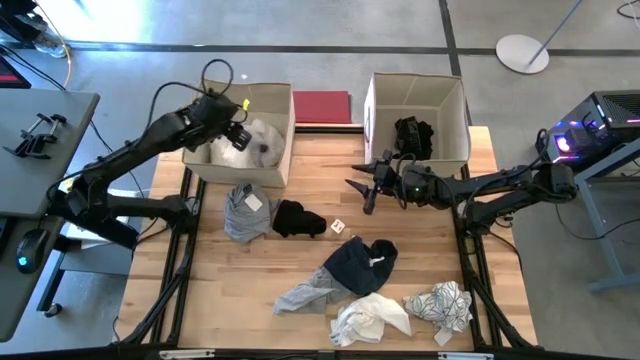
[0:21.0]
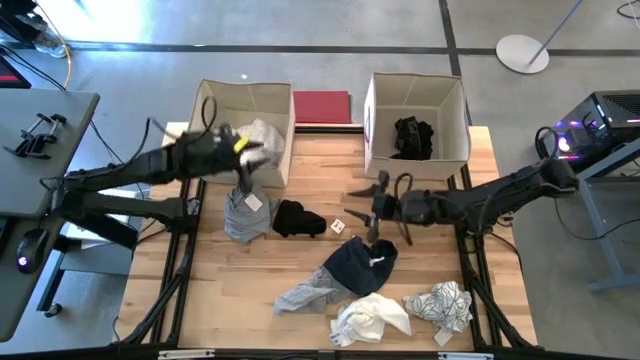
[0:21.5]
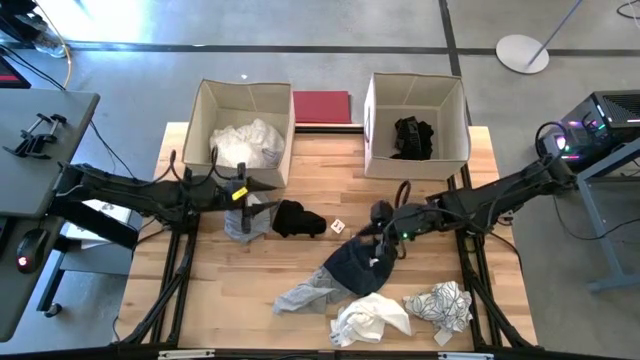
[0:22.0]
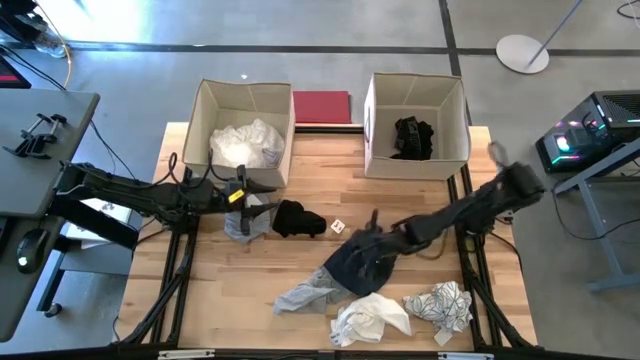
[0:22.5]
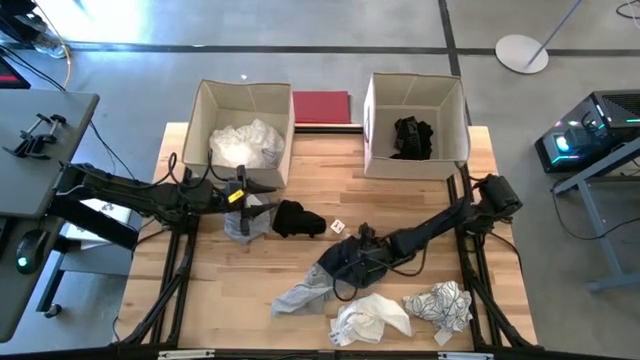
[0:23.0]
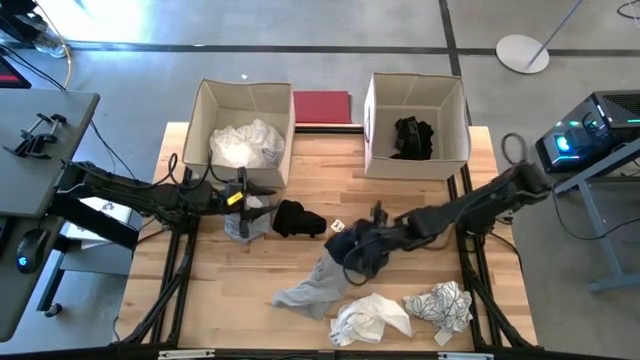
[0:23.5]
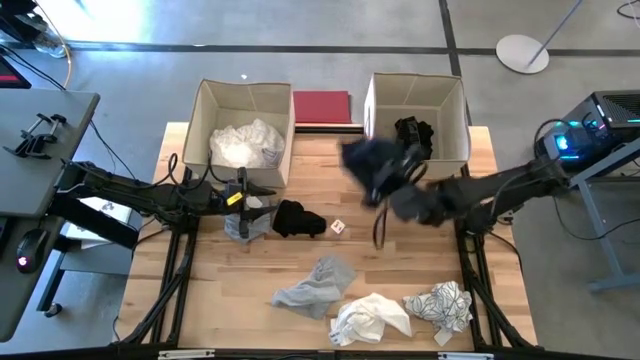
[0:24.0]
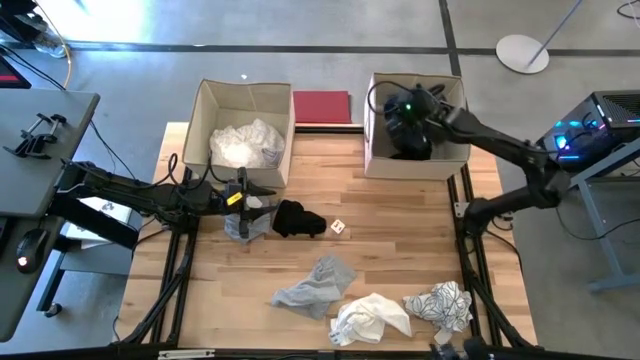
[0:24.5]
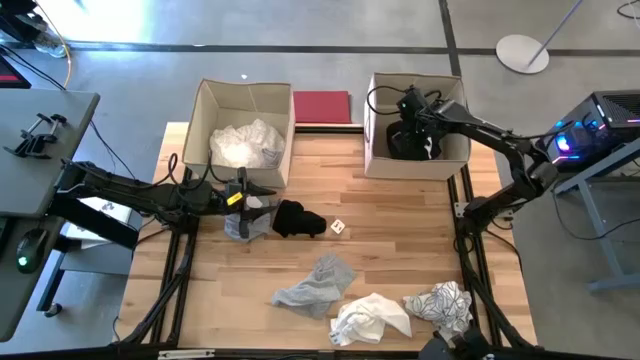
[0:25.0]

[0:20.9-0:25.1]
Put the black shorts into the right laundry organizer

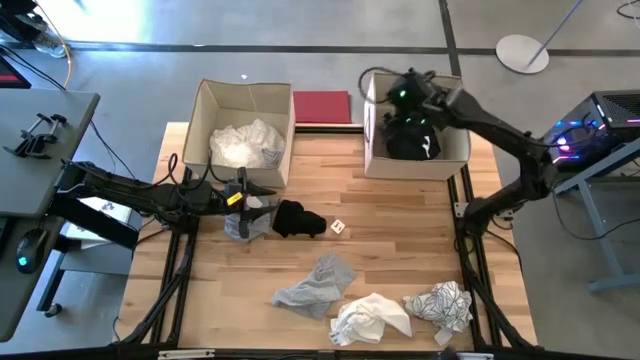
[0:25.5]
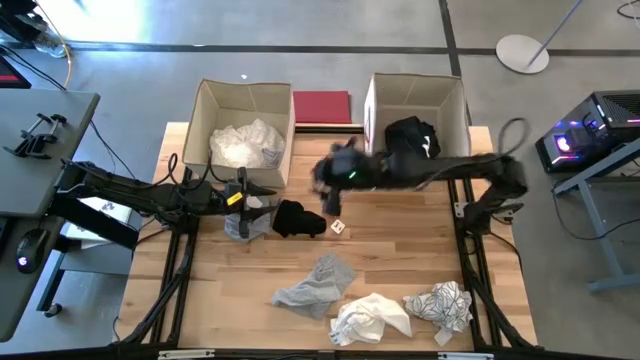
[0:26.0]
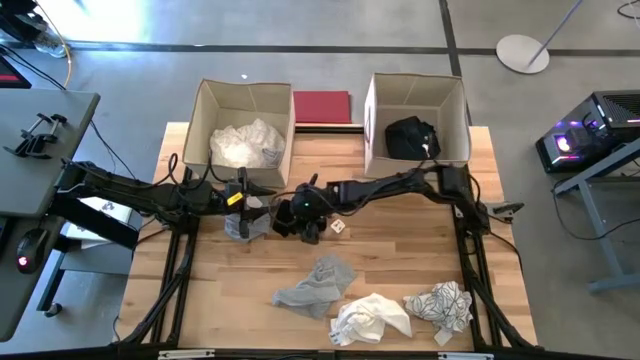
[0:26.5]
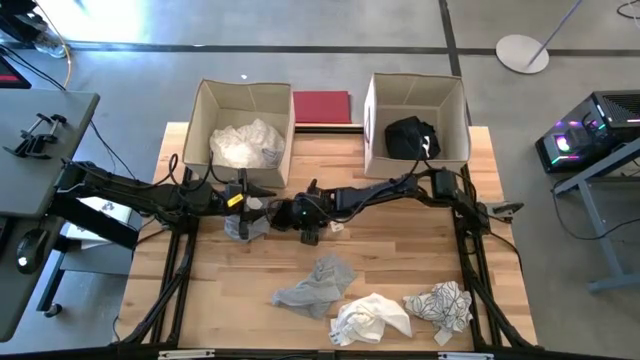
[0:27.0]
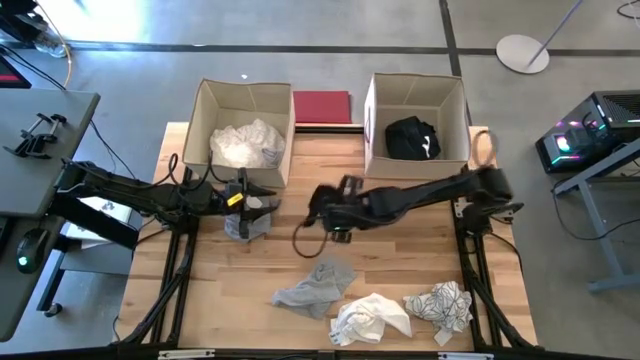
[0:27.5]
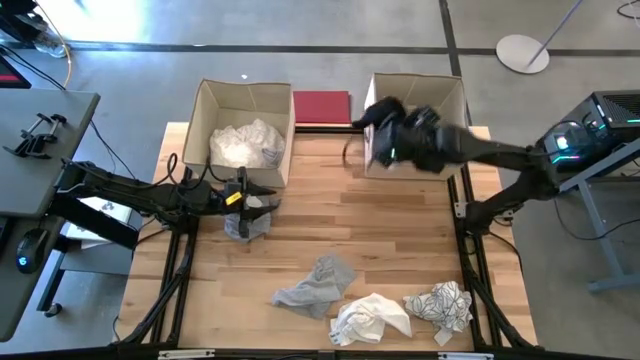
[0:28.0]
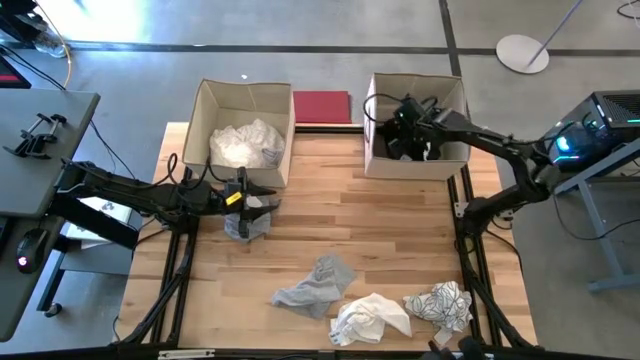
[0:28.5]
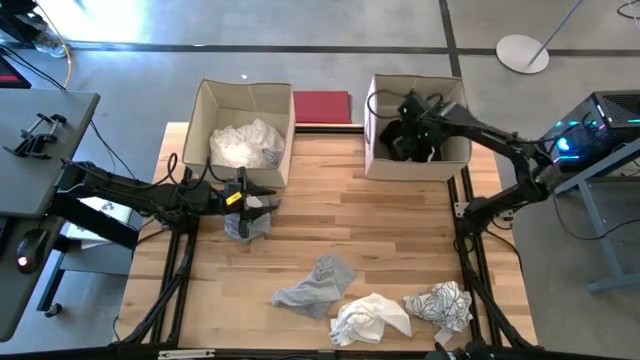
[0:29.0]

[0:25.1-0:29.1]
Put the black shirt into the right laundry organizer

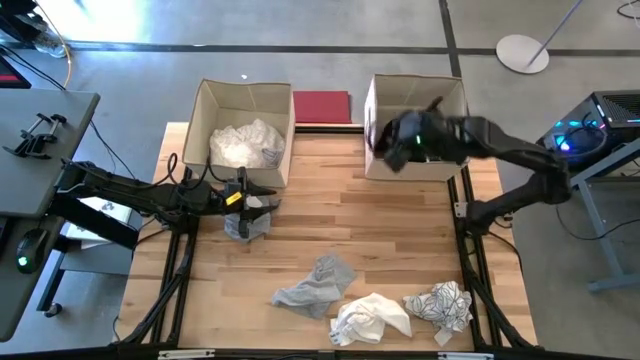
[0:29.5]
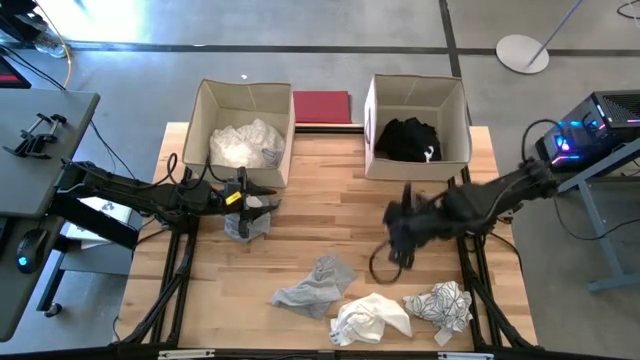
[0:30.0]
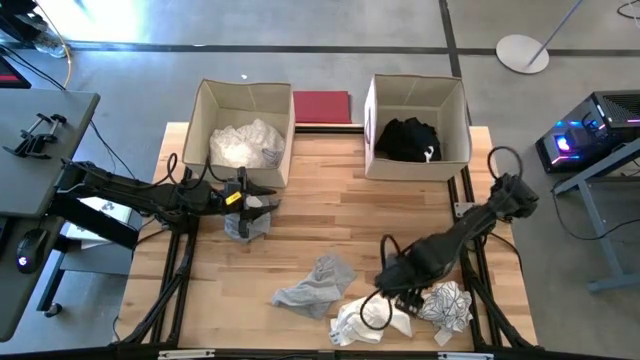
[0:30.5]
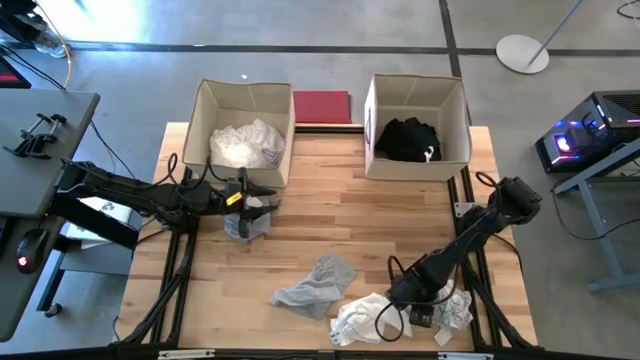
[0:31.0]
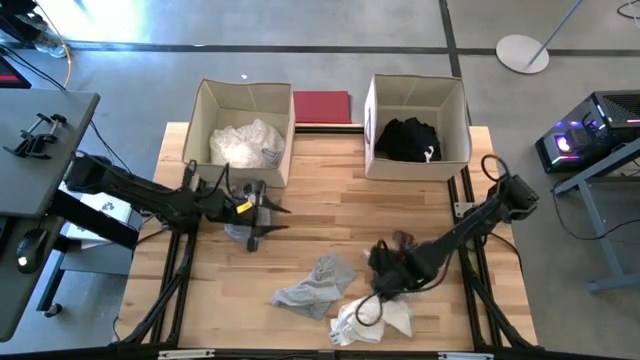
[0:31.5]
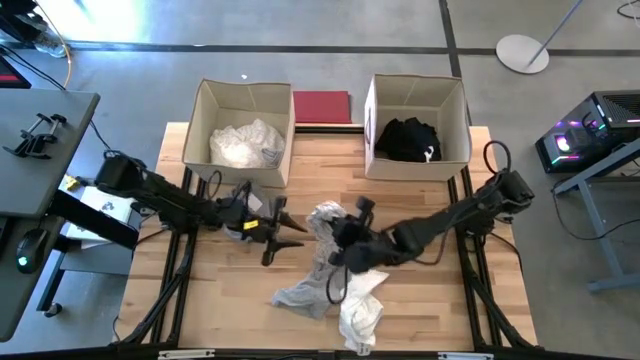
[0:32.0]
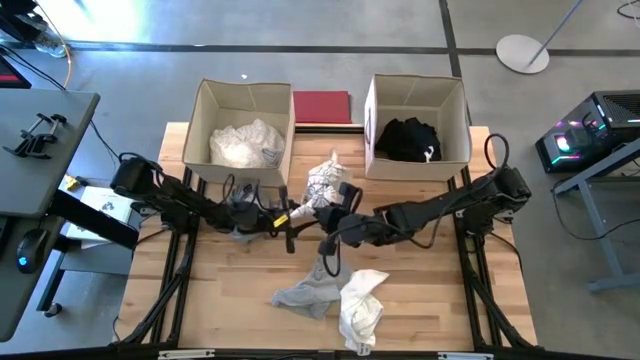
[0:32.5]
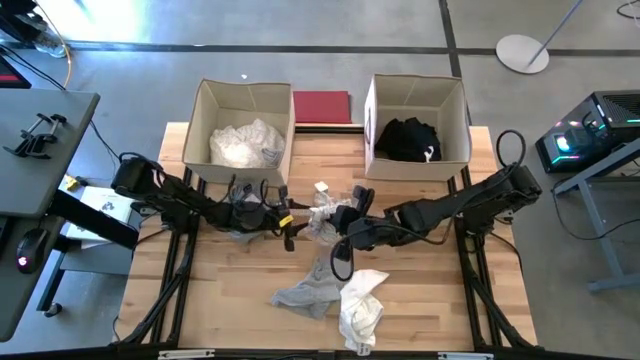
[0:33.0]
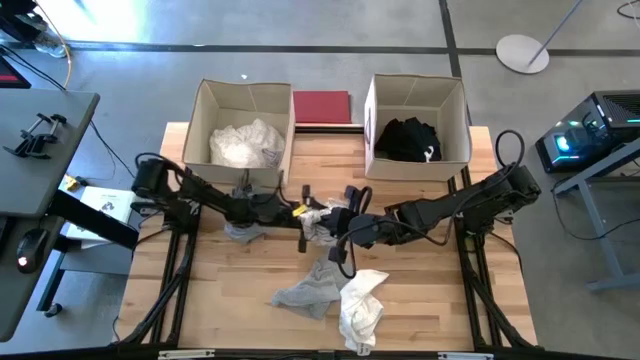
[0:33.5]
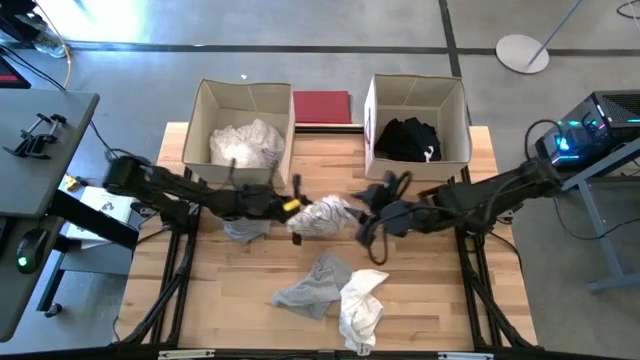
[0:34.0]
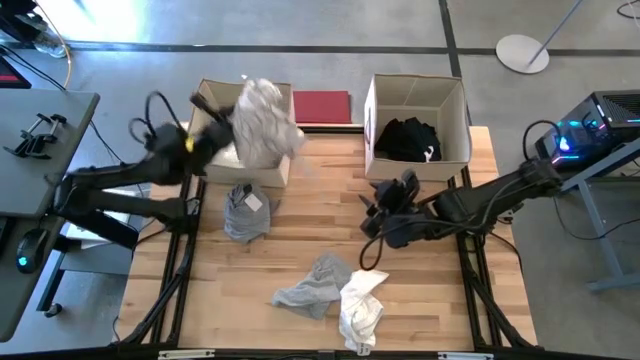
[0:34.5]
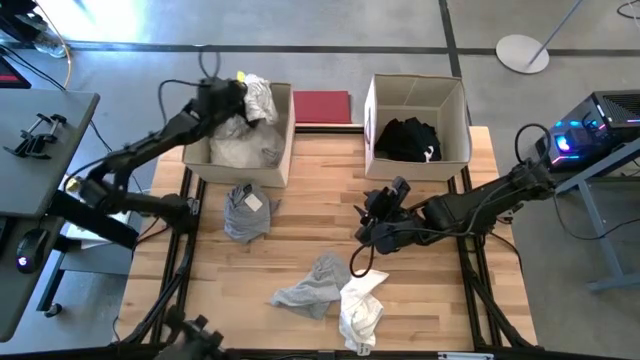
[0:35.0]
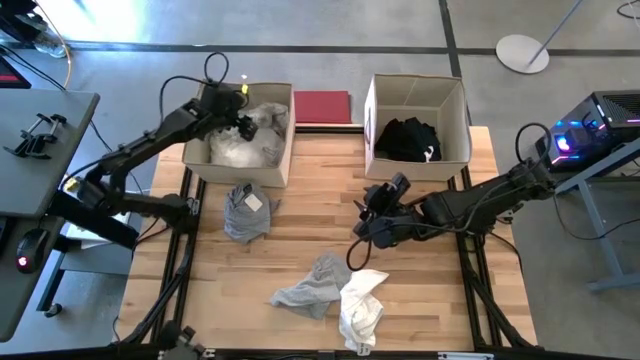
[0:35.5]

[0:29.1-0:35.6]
Put the white patterned shirt into the left laundry organizer

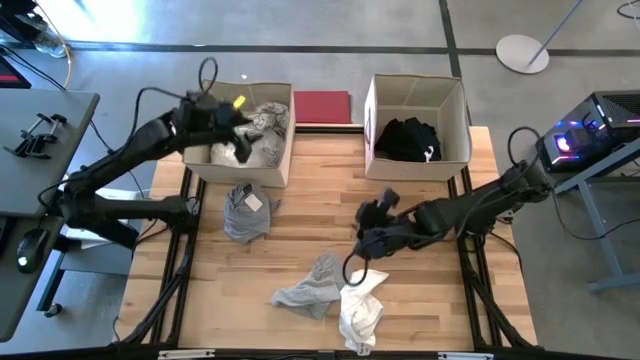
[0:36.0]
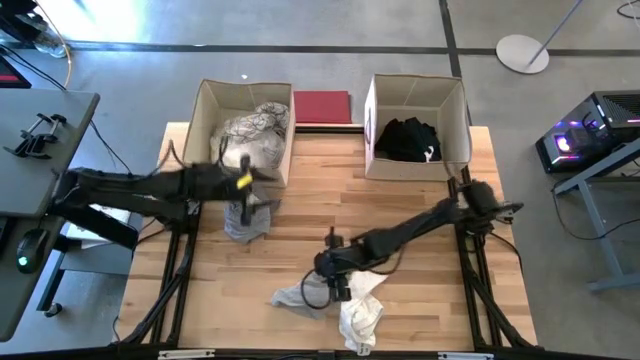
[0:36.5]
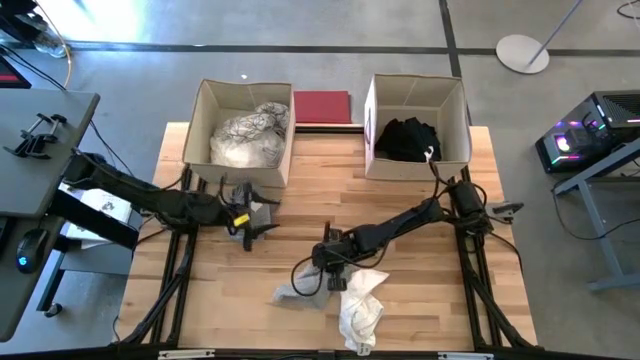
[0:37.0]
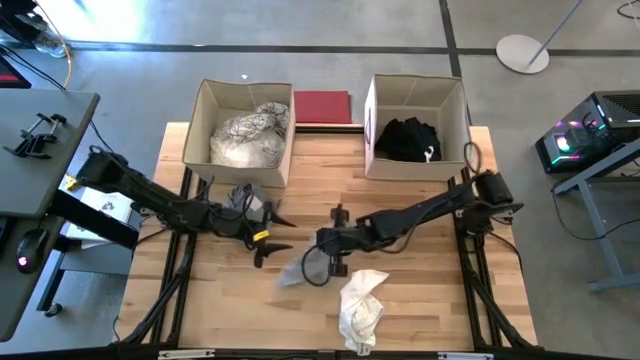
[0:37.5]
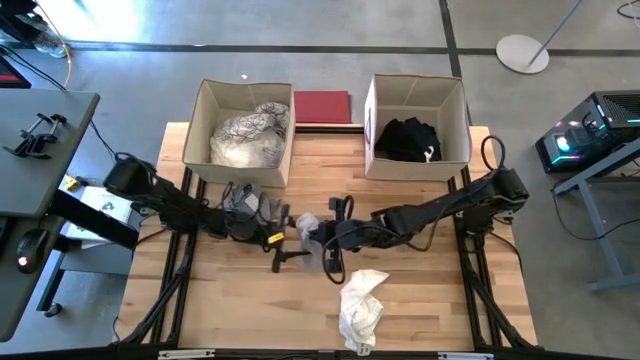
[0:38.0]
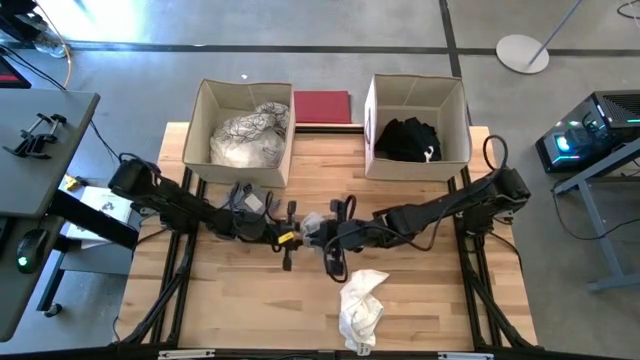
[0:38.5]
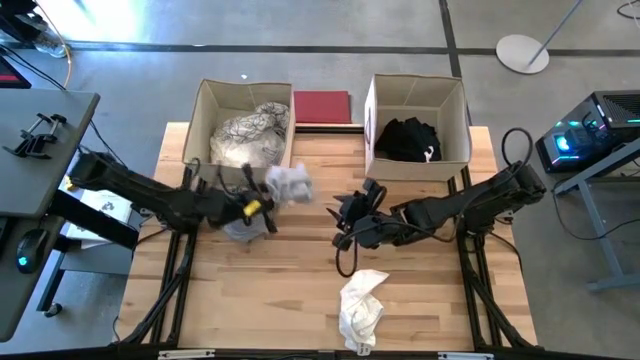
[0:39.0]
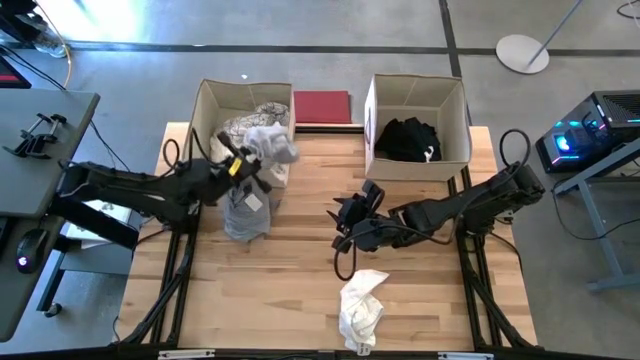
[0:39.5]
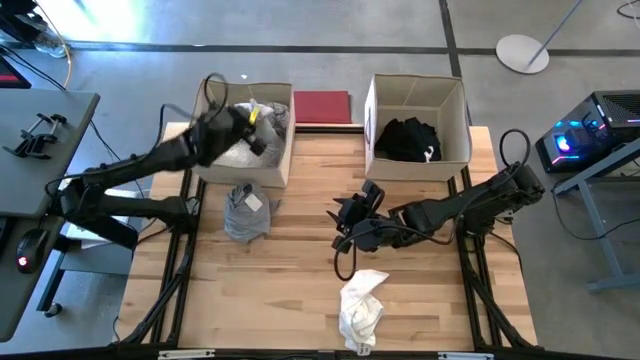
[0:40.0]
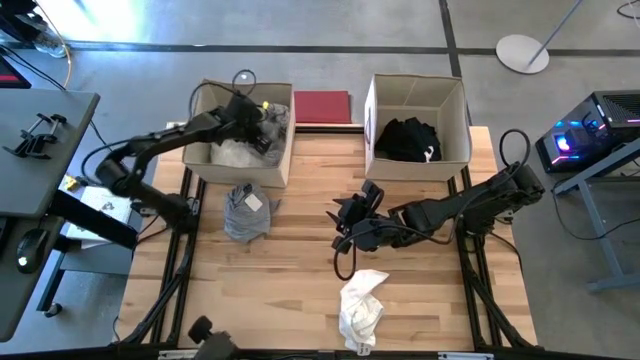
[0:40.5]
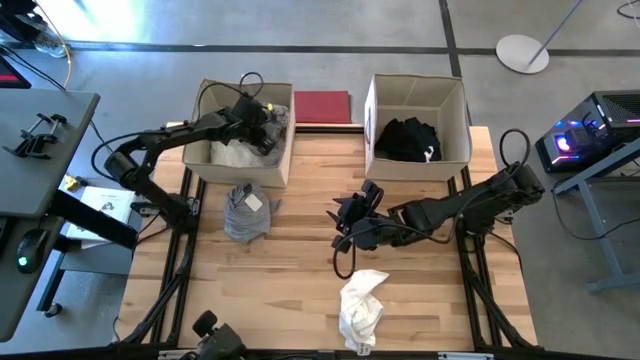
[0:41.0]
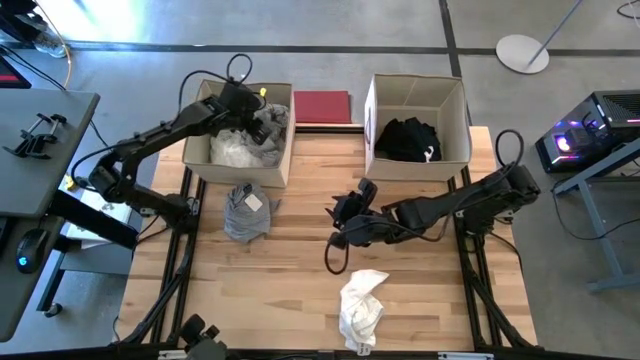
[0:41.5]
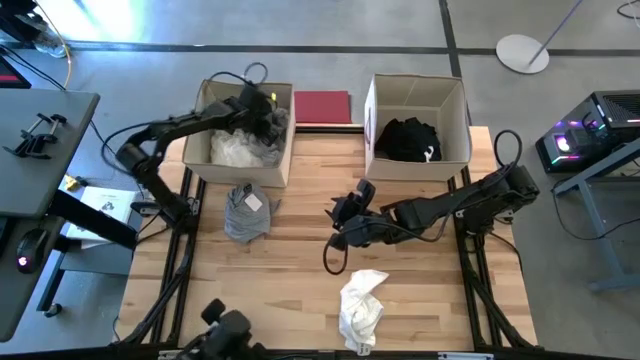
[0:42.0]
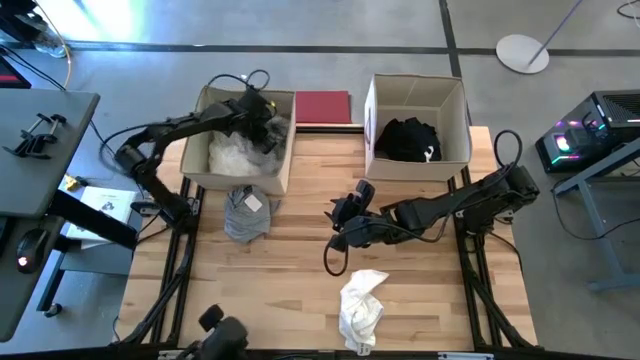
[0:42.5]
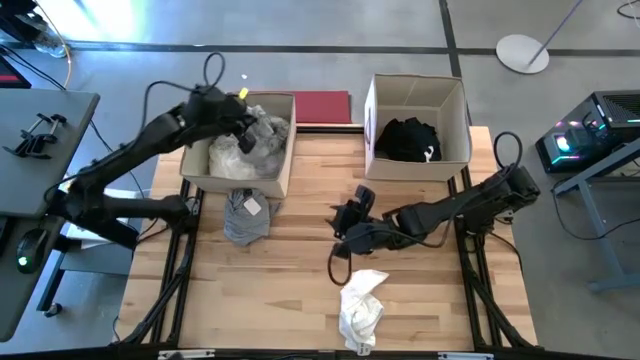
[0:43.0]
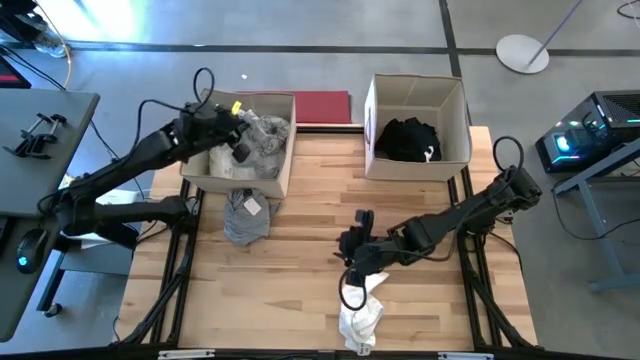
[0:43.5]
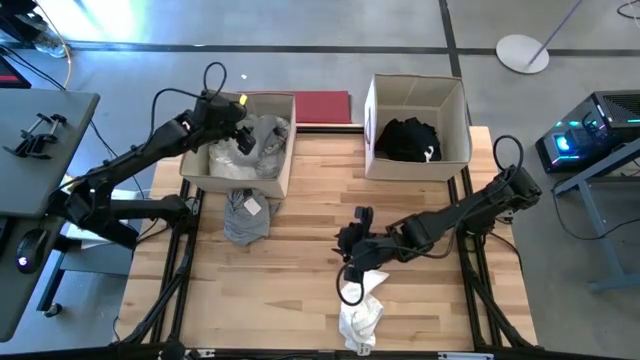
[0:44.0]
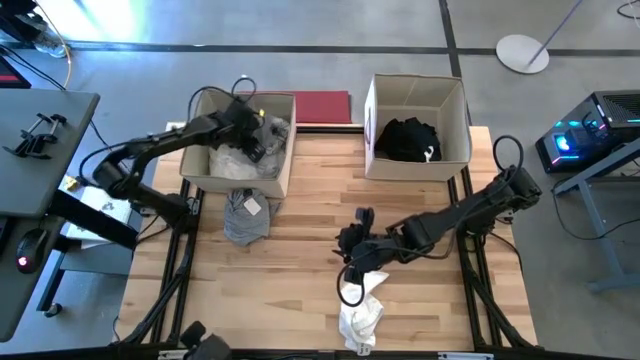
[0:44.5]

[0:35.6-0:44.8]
Put the gray shorts into the left laundry organizer
